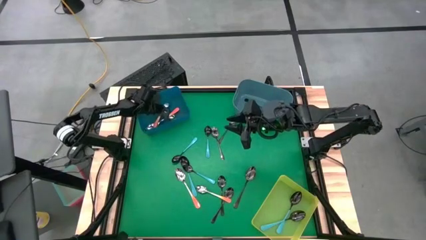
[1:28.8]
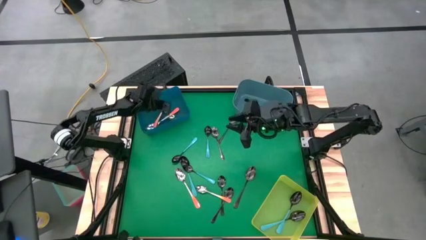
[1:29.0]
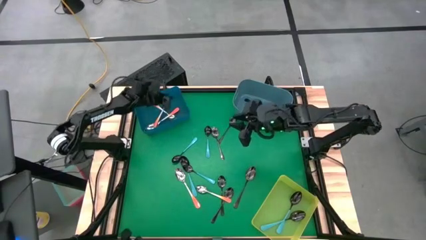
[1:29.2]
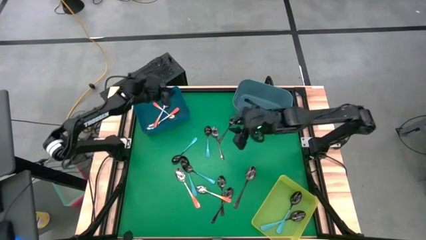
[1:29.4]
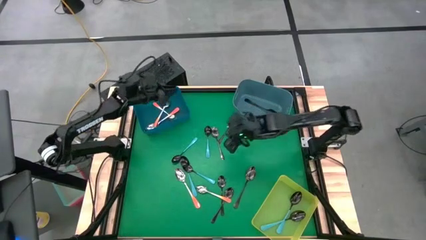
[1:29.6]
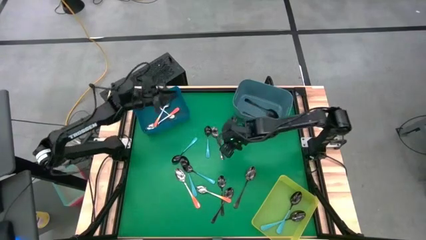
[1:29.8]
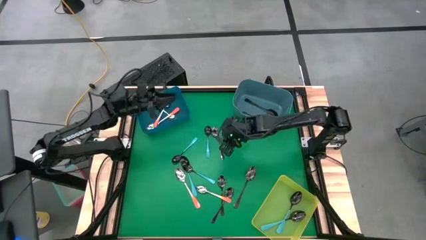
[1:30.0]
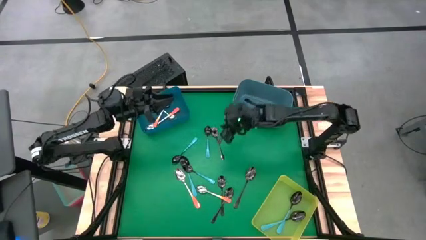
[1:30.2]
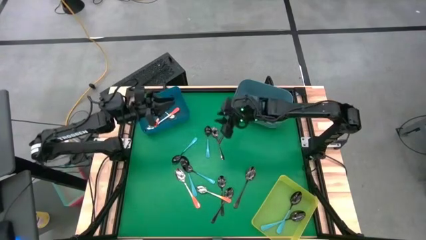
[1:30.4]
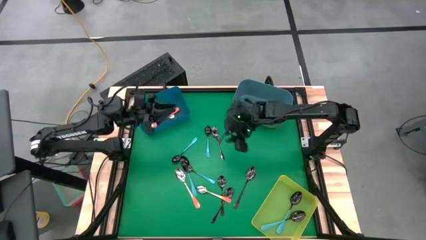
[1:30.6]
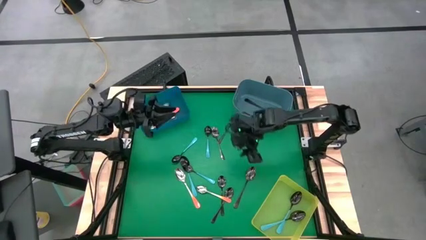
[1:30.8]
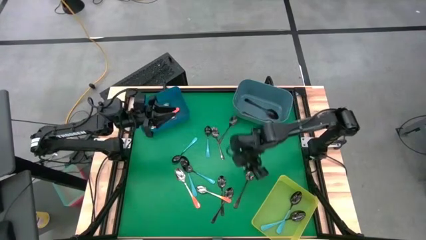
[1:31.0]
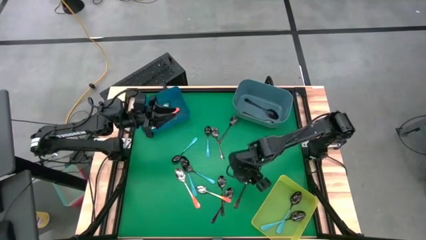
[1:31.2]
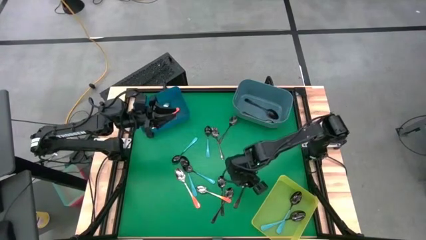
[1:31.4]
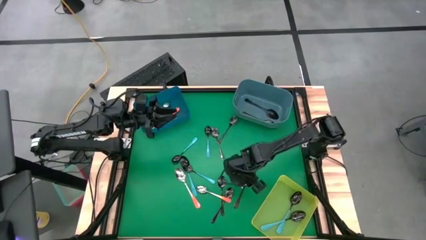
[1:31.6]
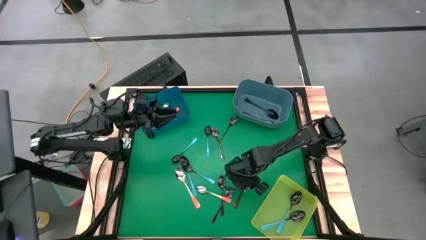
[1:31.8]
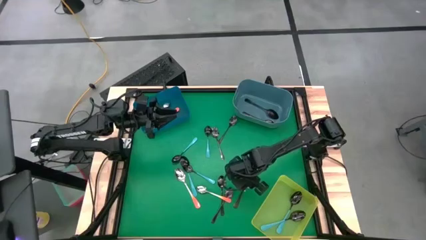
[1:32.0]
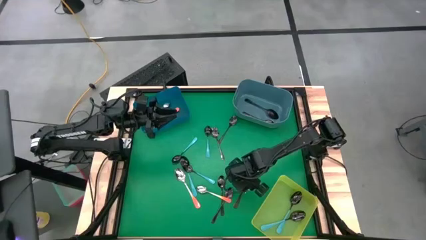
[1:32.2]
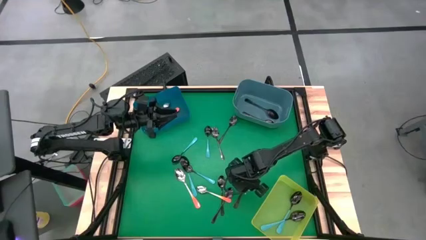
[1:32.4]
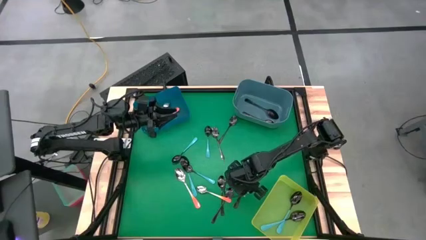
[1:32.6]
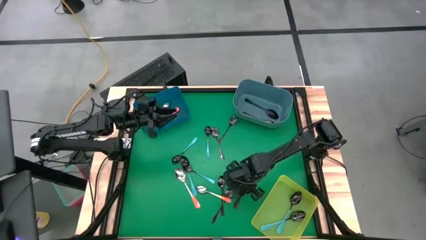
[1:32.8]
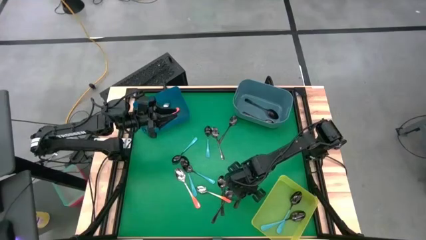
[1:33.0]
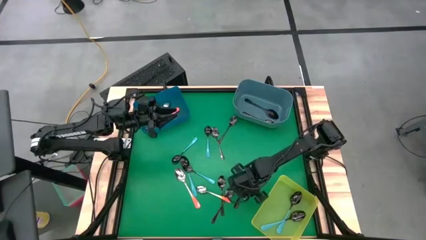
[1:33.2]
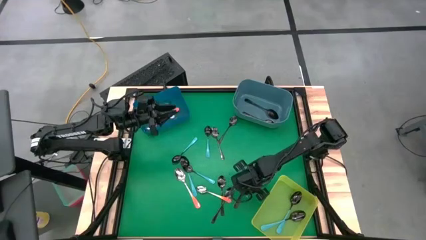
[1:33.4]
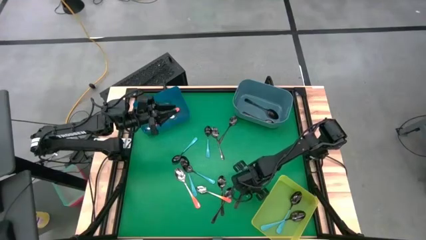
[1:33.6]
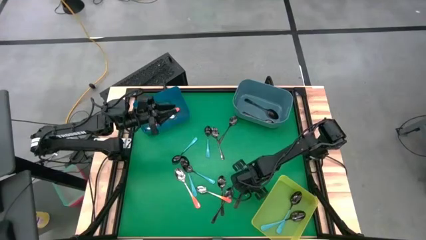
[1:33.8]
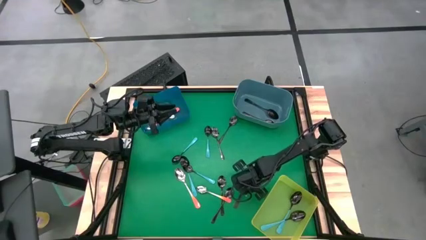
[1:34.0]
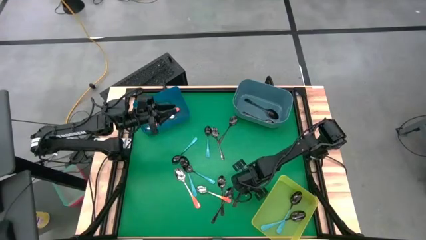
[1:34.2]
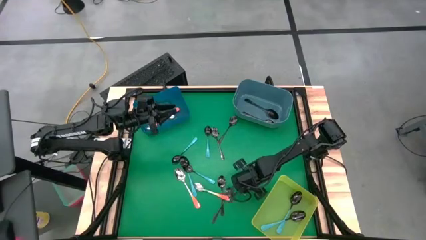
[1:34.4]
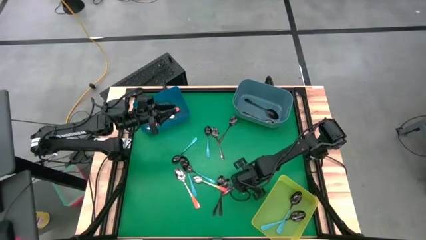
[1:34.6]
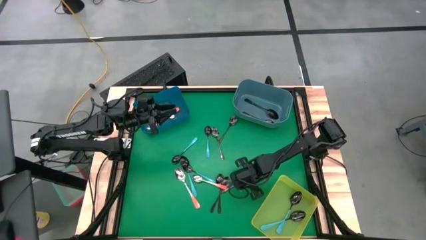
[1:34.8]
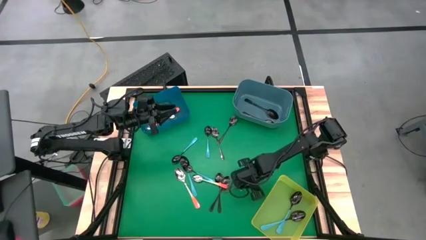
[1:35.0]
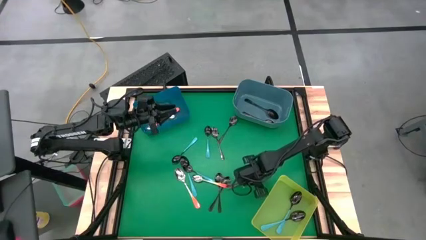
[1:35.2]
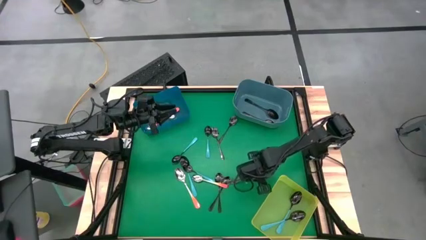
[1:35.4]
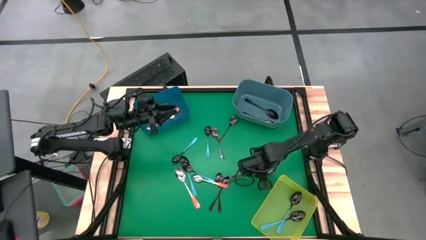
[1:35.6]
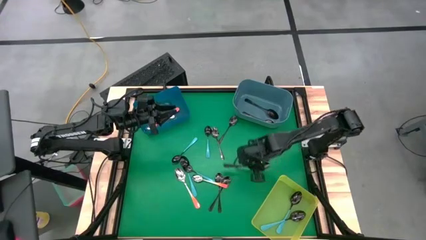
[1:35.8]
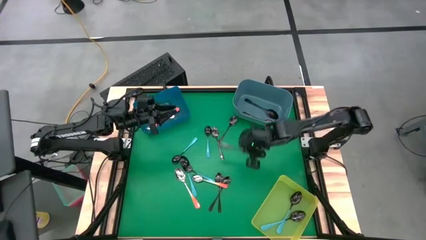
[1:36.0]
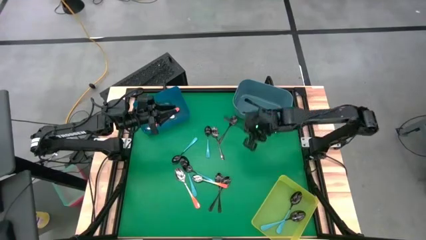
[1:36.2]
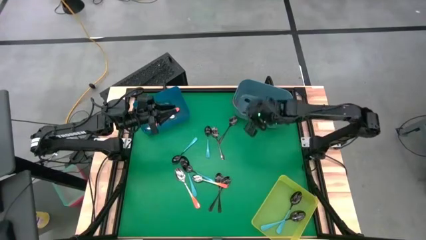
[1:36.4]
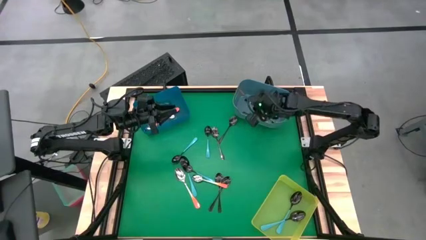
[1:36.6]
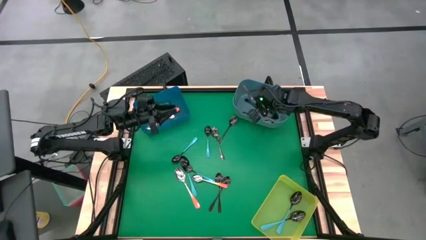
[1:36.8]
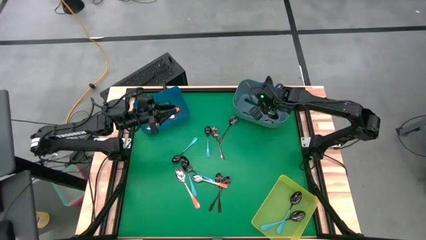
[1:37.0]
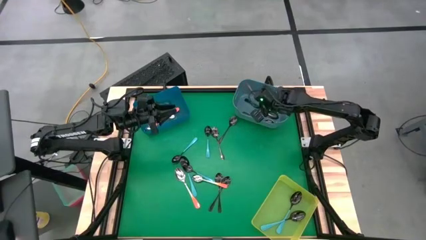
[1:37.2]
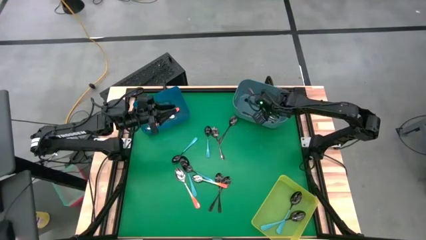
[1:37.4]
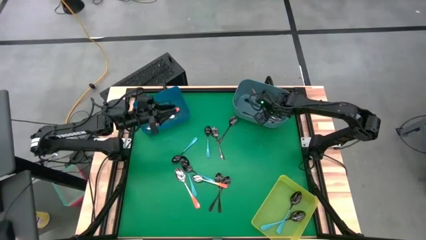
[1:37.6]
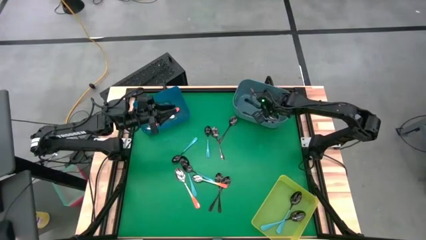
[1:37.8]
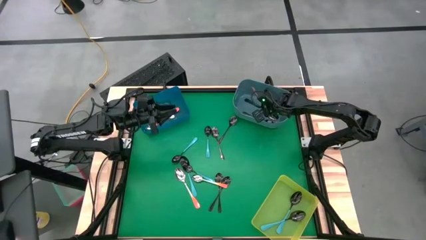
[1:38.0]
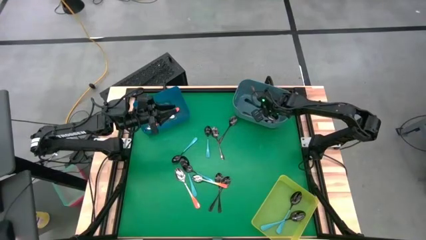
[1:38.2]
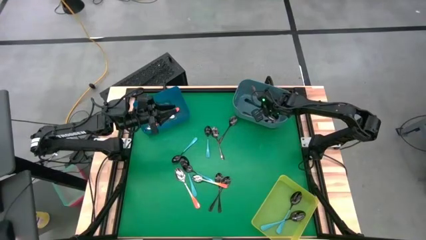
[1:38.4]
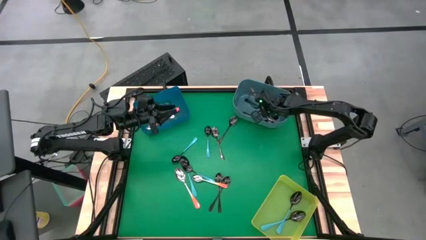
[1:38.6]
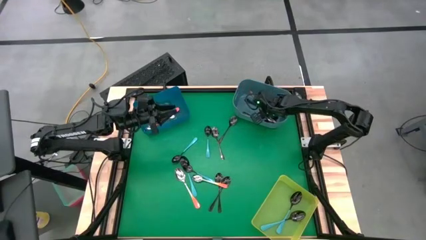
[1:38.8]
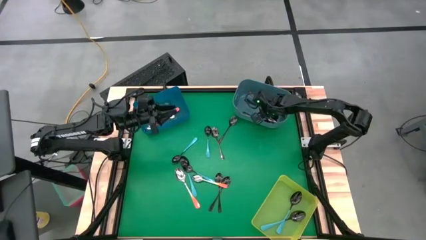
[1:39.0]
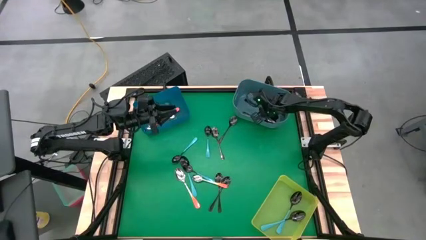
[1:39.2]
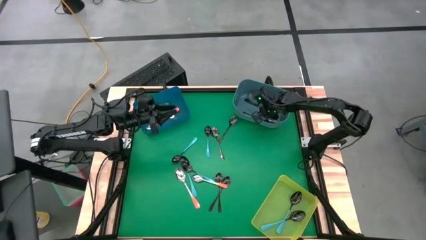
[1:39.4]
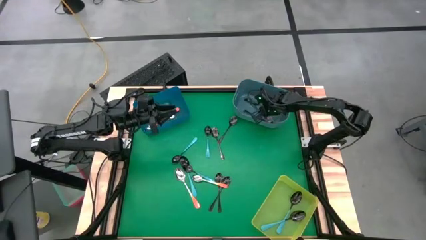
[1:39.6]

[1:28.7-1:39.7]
Task: Sort silverware by color (type)
Put the black spoon into the blue bin

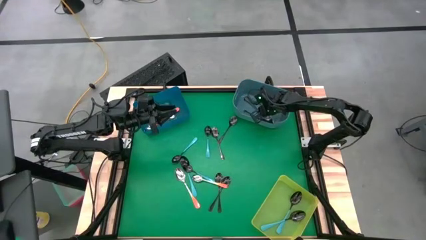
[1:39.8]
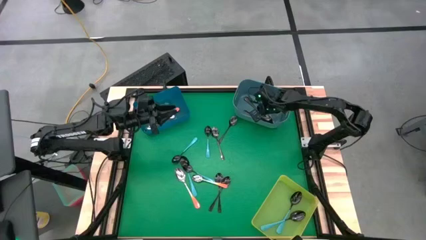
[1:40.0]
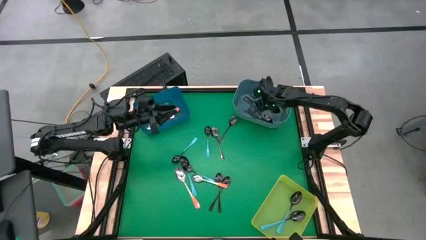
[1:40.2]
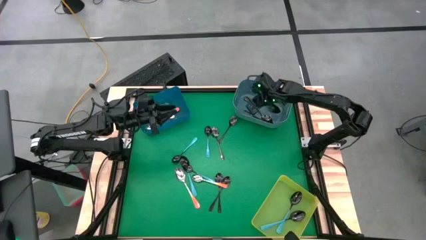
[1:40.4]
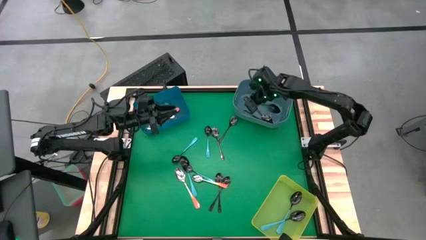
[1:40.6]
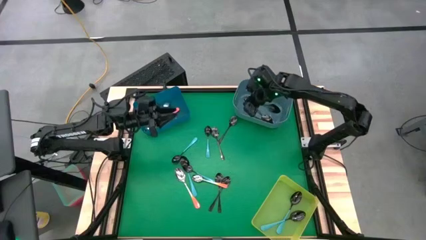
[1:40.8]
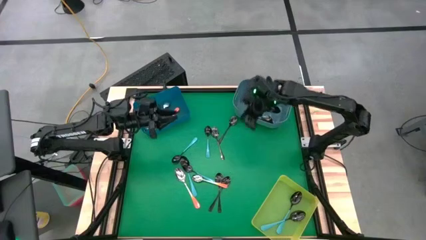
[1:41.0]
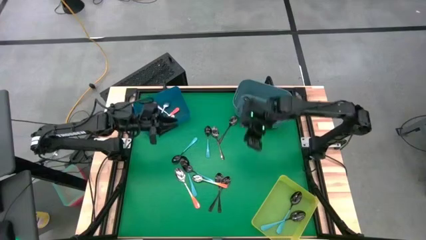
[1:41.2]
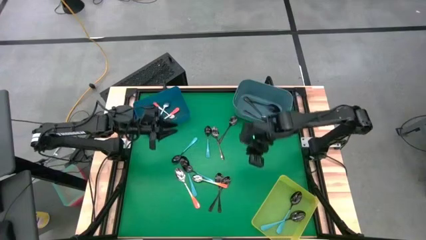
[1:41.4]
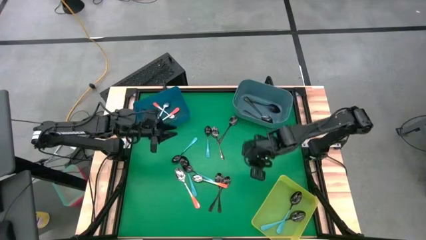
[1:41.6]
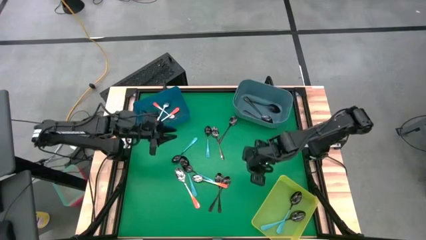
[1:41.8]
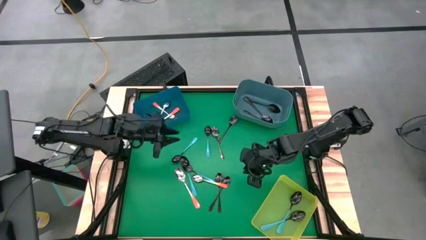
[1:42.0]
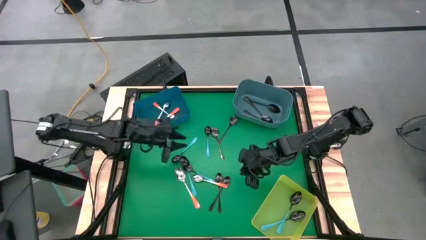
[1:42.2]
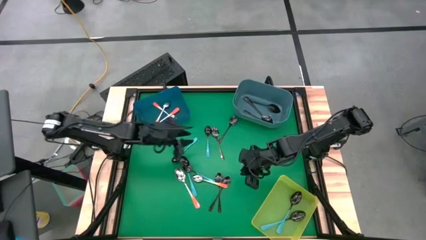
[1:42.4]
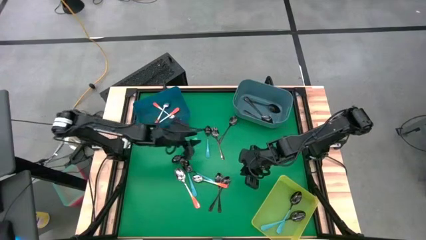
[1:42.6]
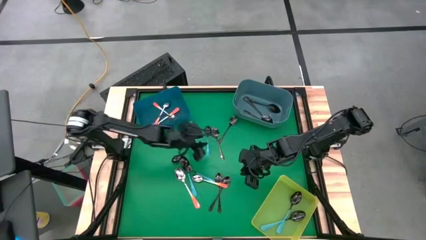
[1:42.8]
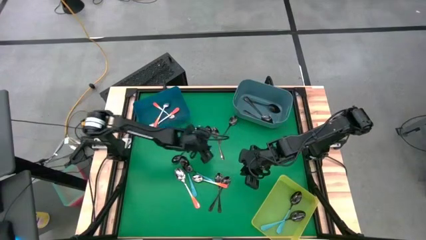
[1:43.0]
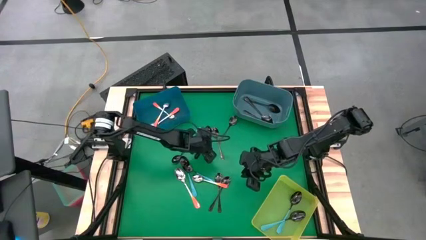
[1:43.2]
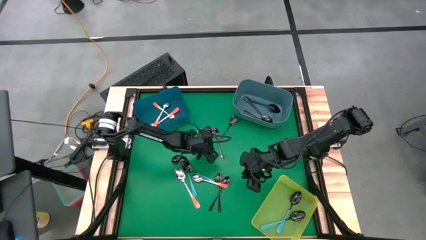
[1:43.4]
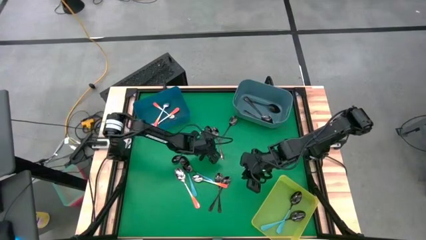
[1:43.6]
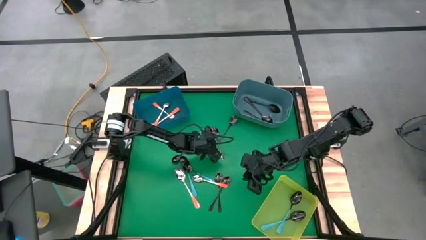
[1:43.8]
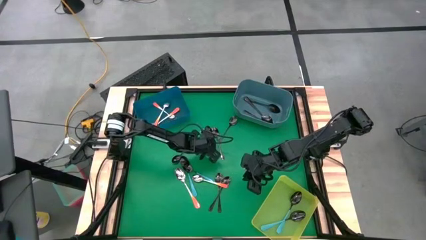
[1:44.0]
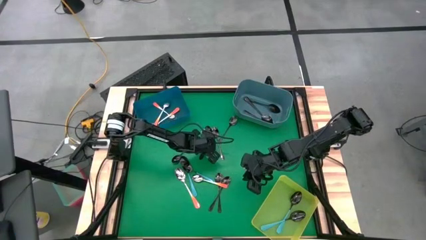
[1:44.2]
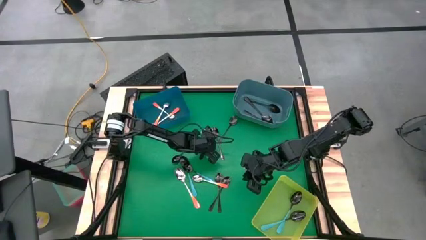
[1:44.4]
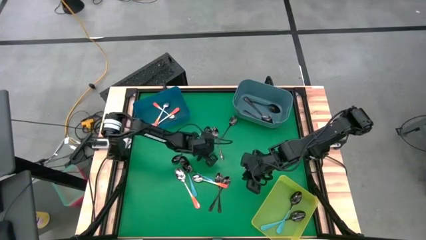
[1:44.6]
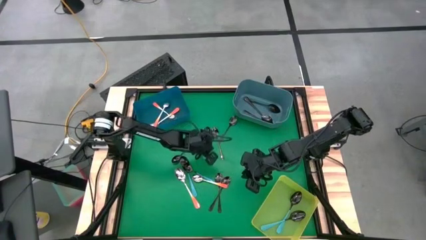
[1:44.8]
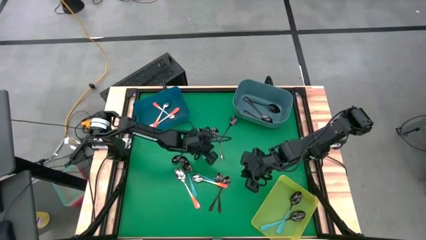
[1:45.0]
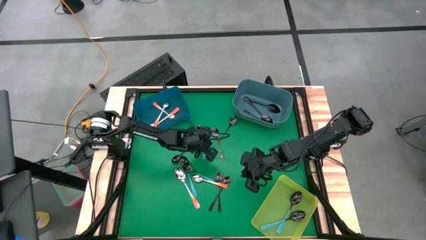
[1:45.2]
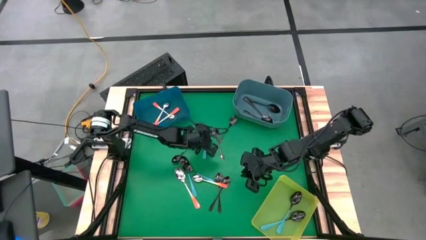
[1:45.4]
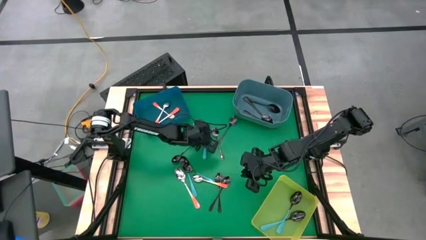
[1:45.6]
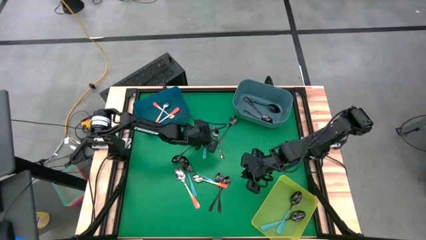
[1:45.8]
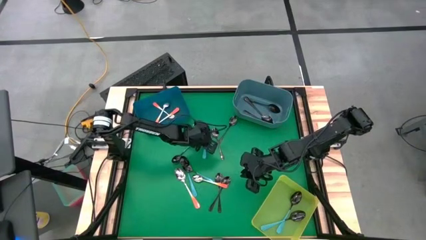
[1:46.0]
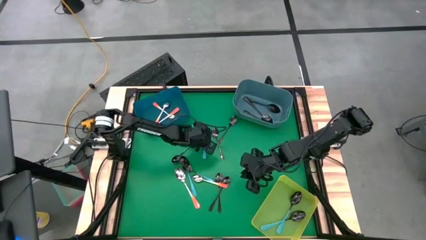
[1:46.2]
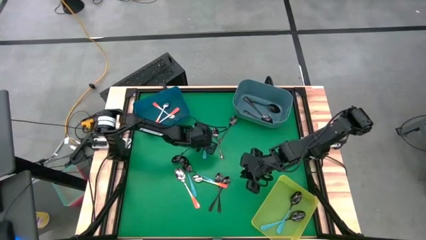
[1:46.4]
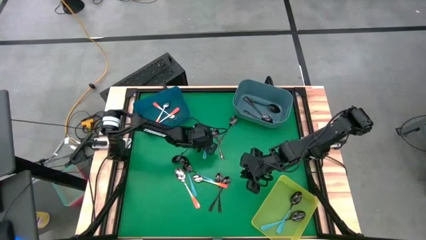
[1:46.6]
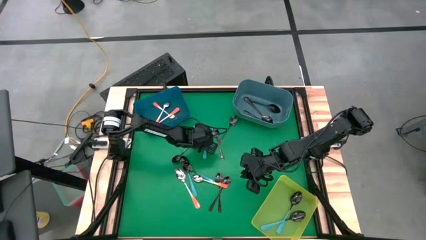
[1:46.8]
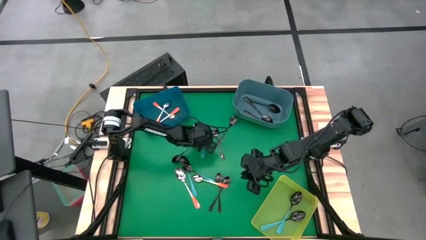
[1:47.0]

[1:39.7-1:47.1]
Put the blue spoon into the yellow bin
